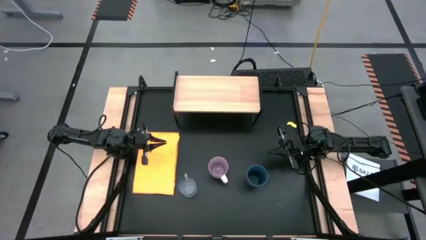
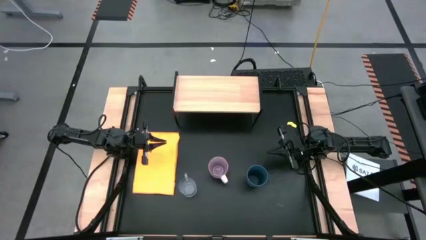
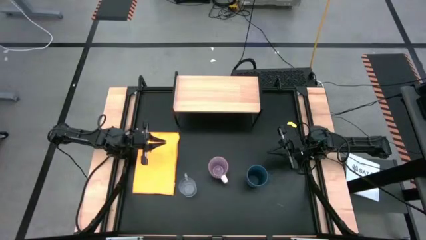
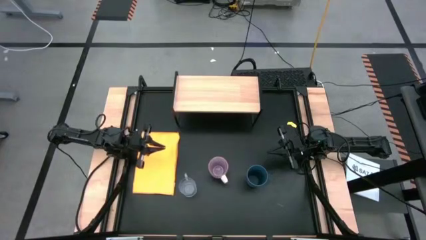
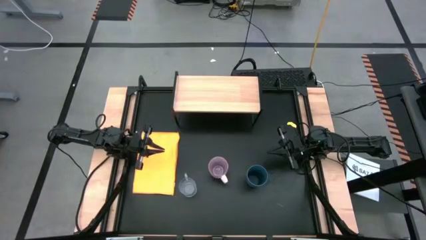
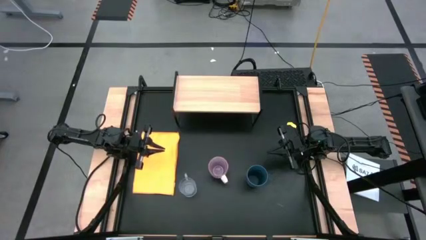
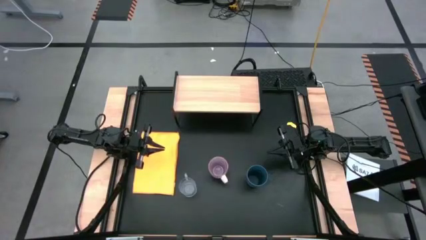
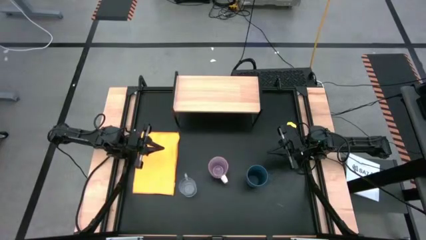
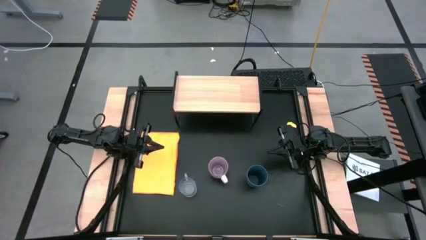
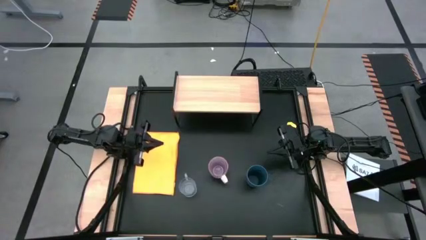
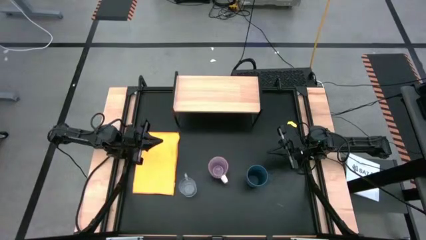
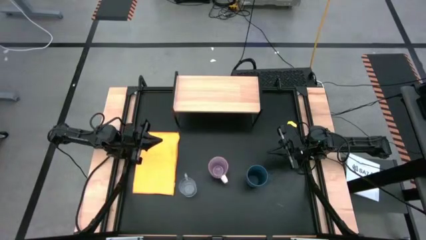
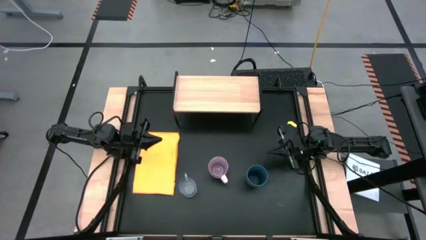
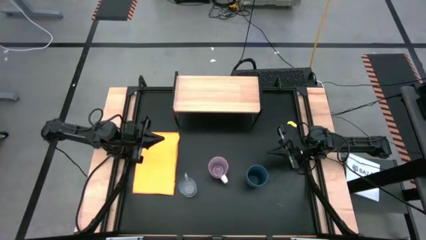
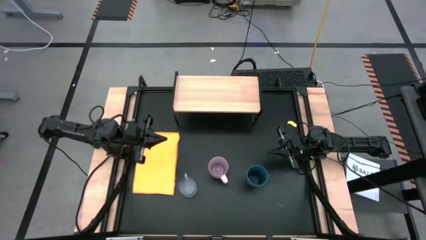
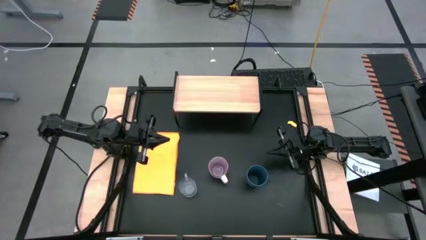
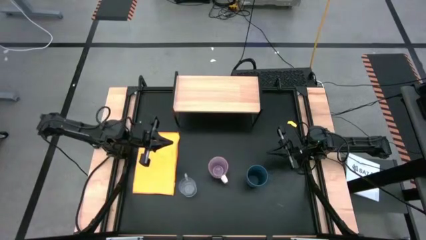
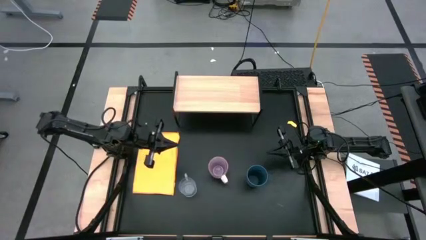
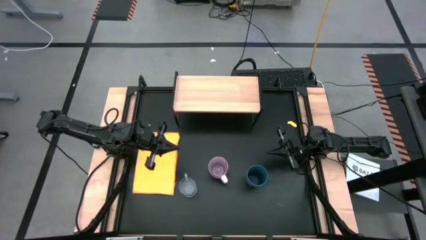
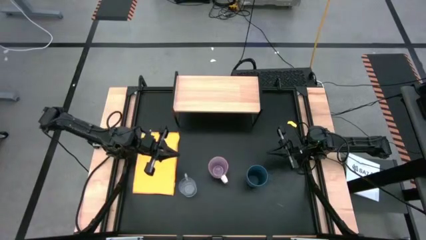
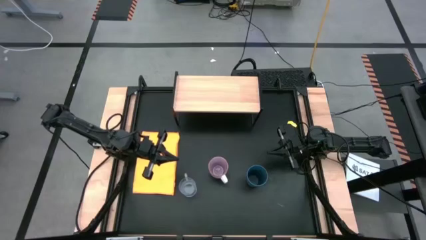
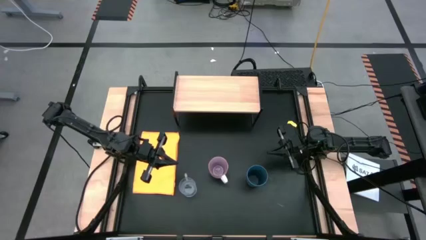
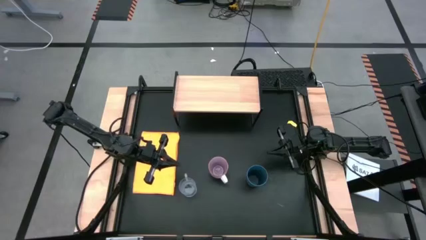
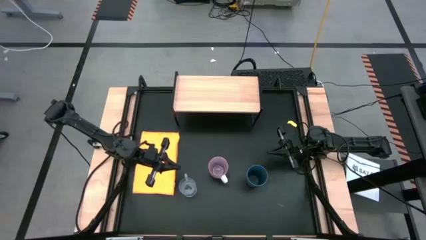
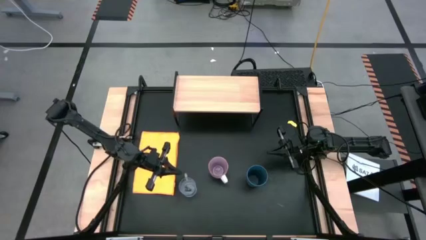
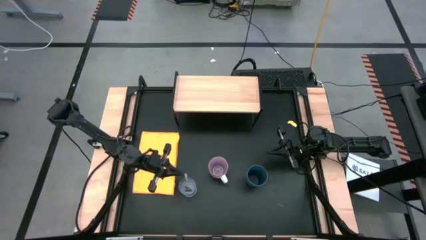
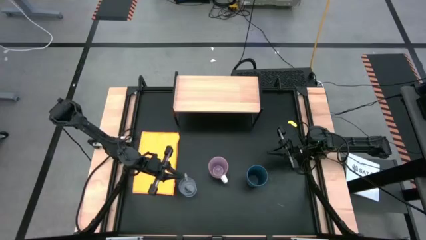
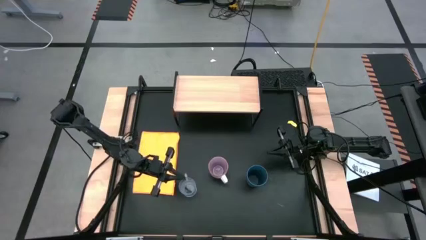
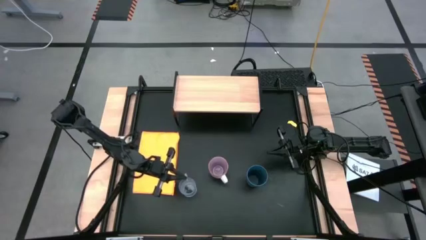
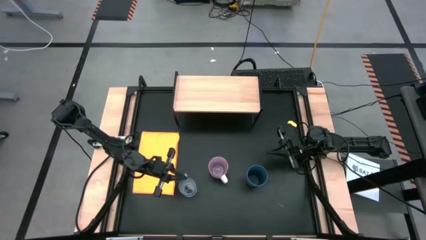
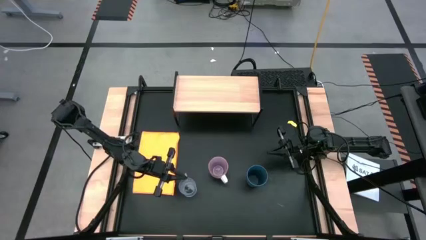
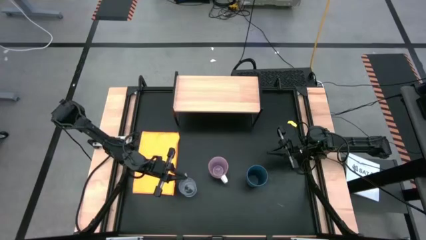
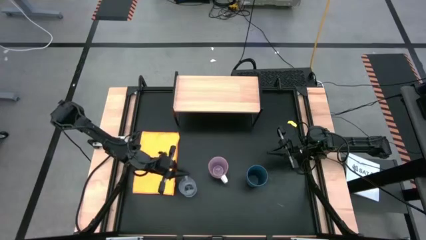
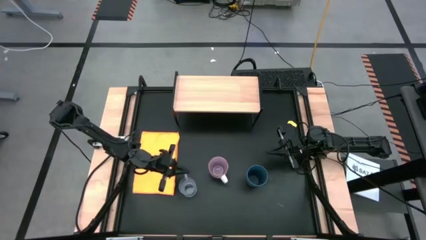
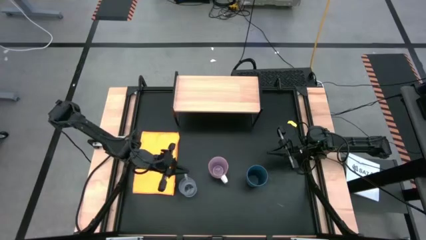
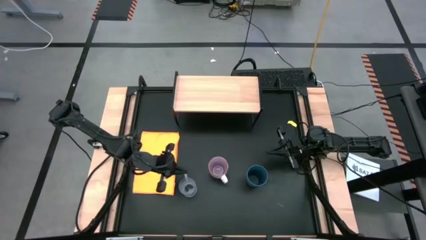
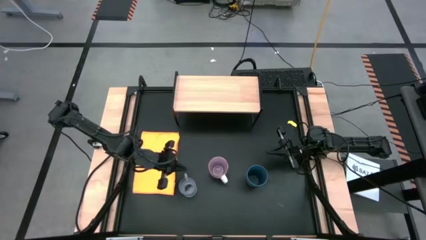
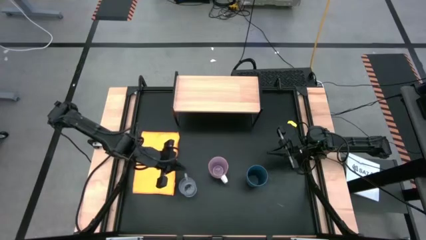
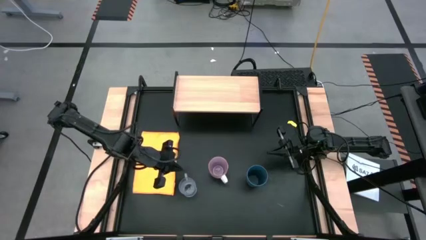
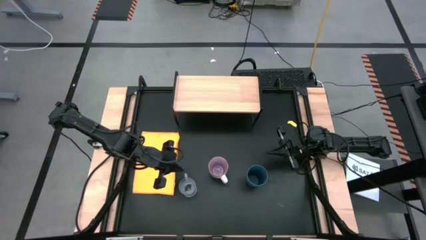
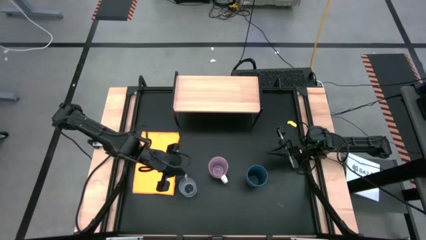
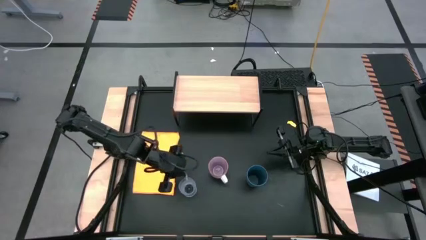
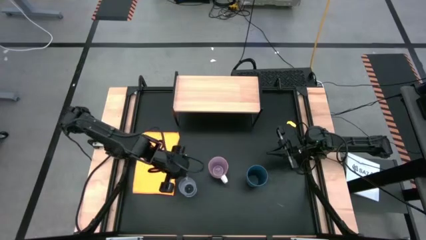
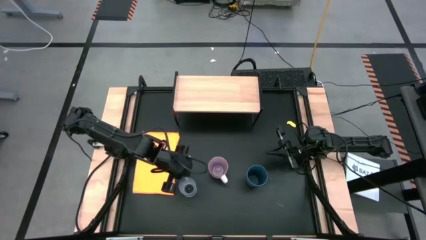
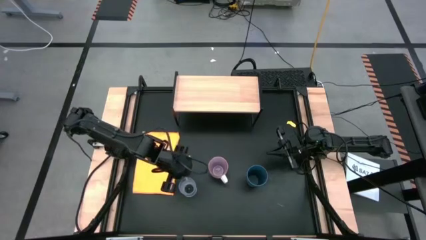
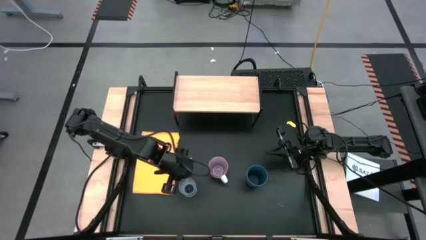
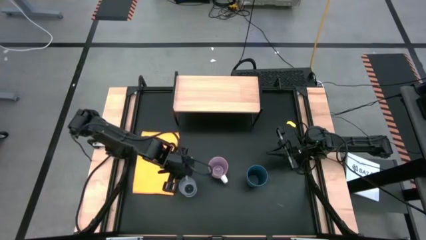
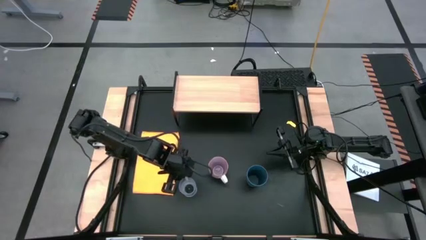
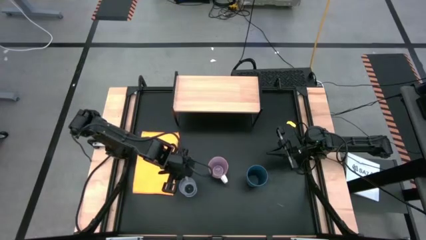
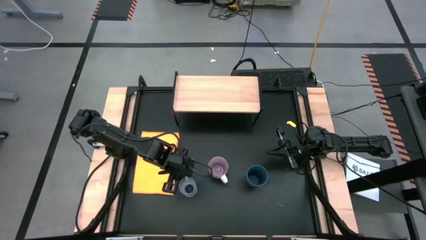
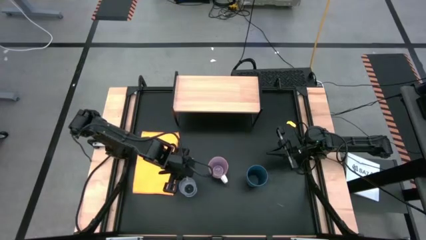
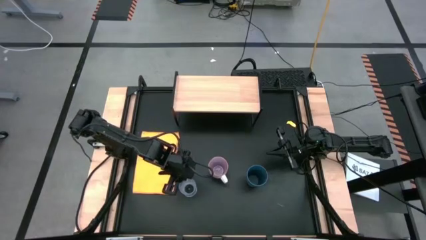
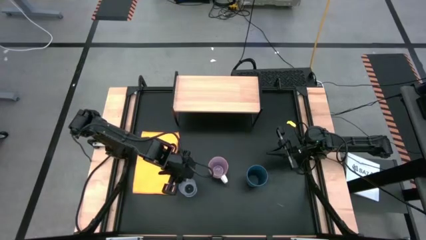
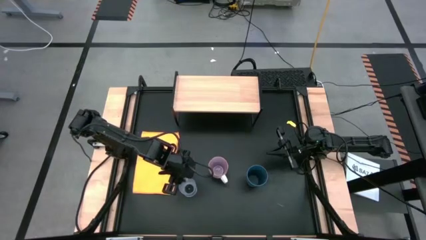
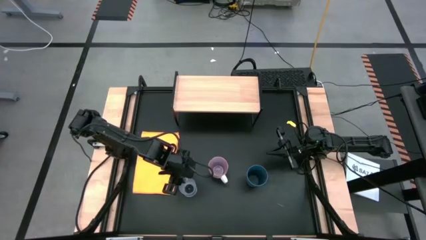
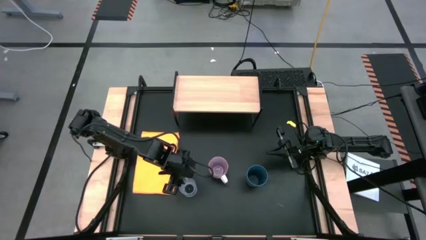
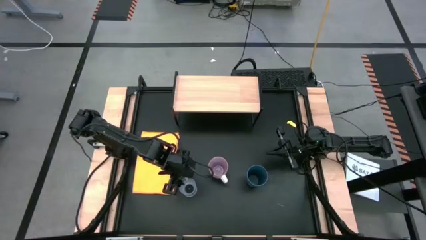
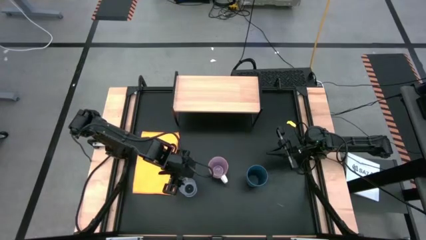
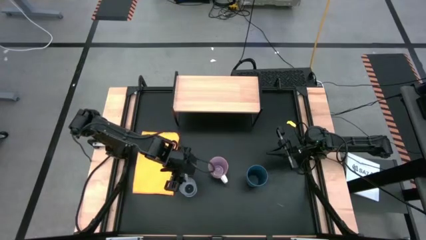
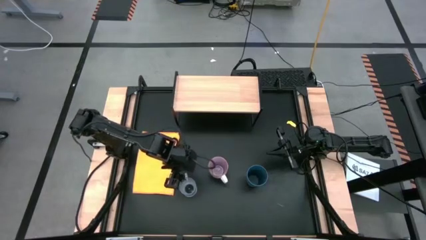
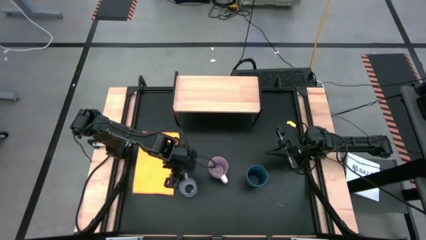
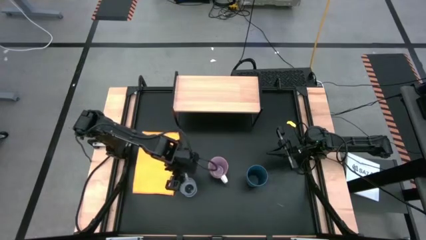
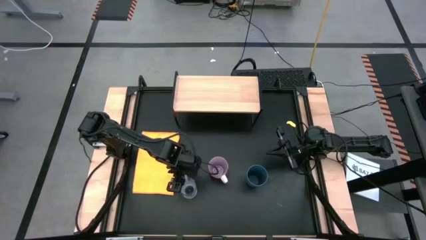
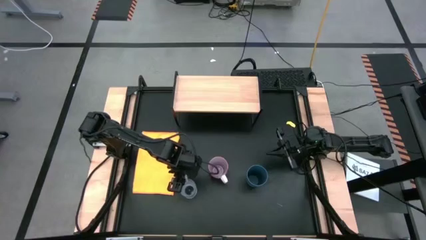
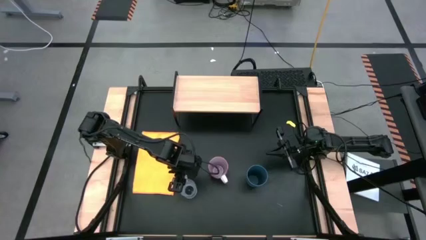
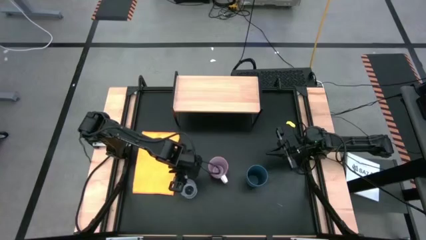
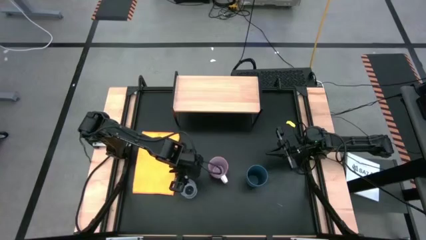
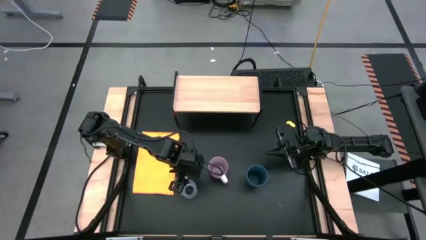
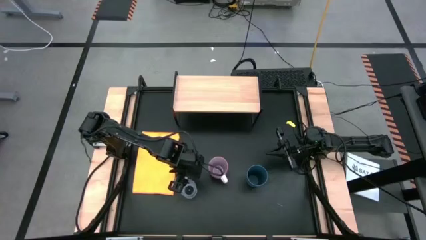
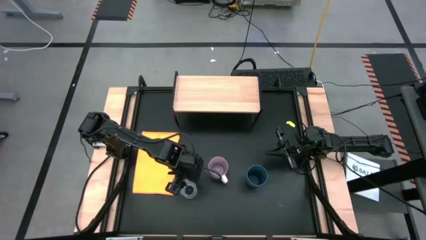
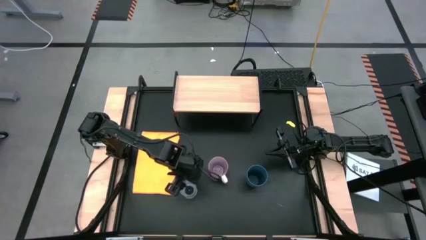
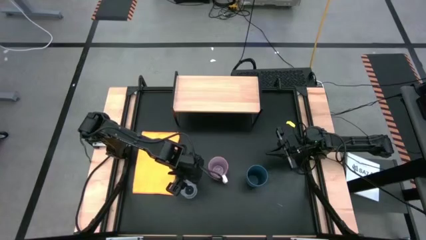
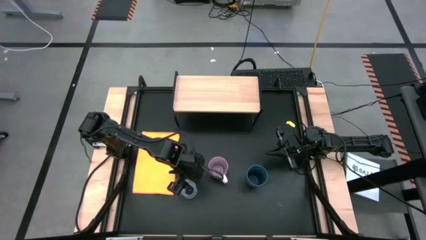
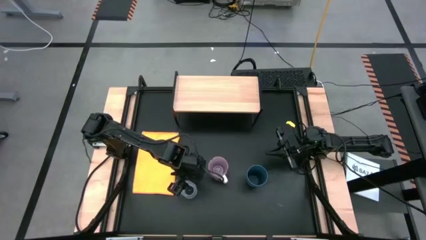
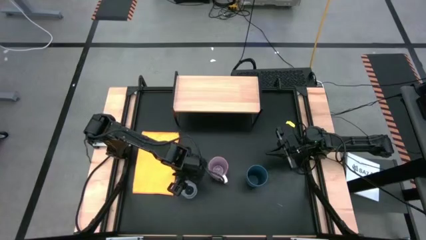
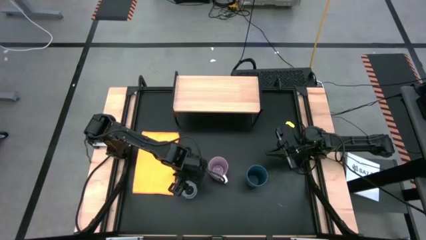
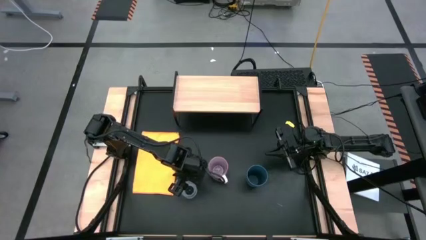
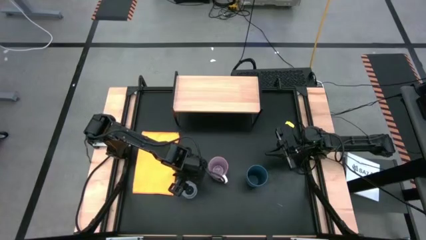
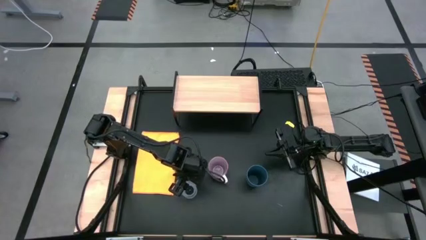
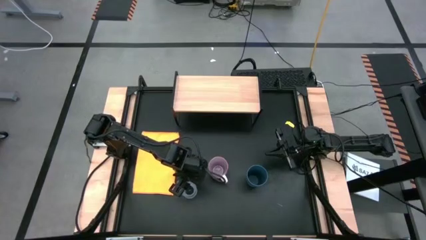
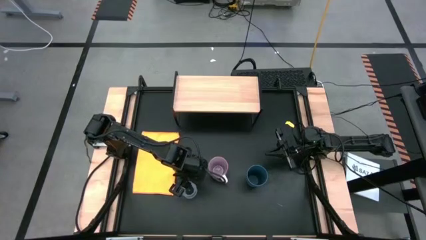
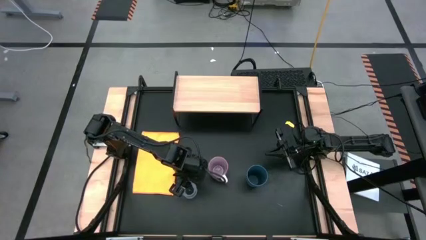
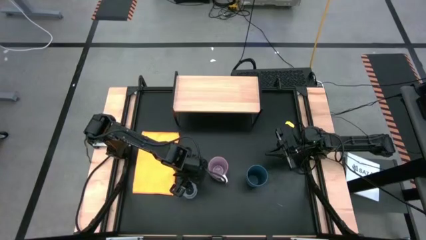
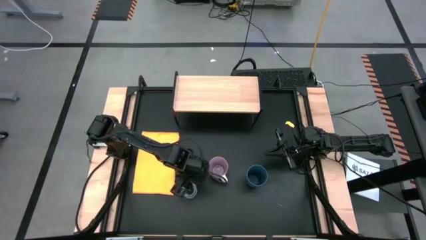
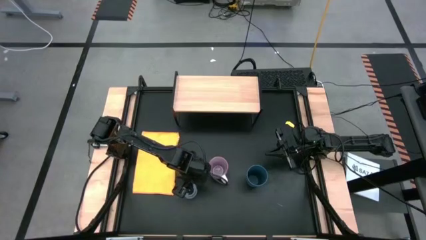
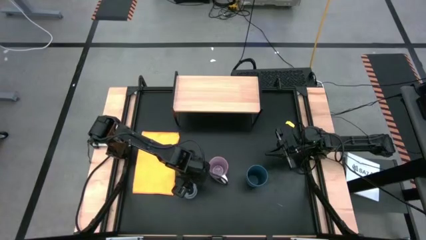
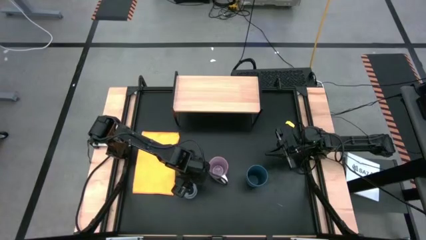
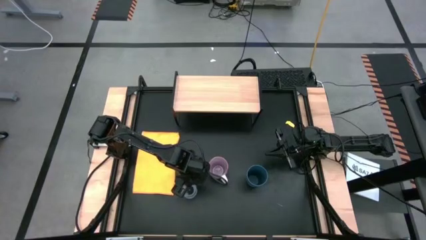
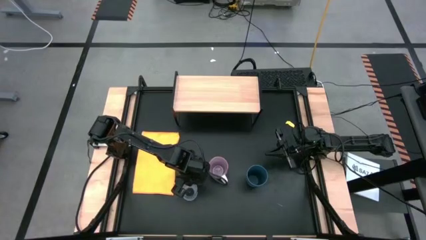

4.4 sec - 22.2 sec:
Task: Stack small to large cups/mugs on shelf
Put the transparent mug on the shelf
